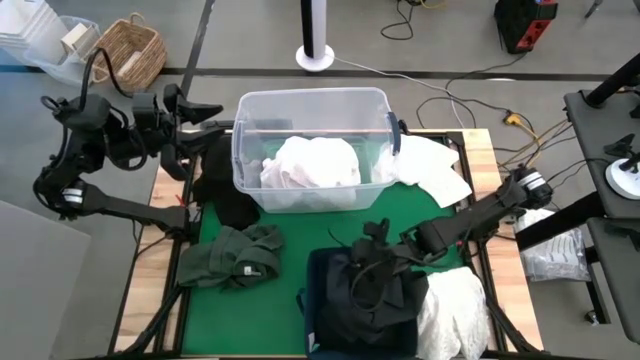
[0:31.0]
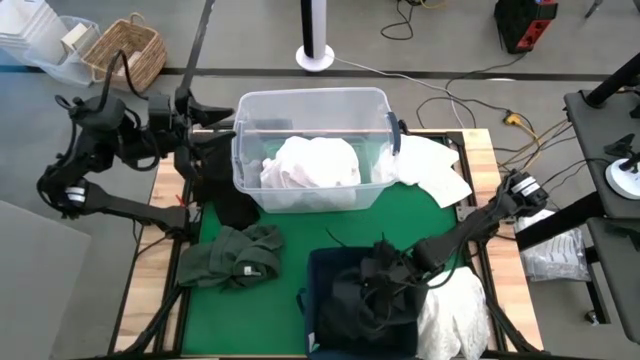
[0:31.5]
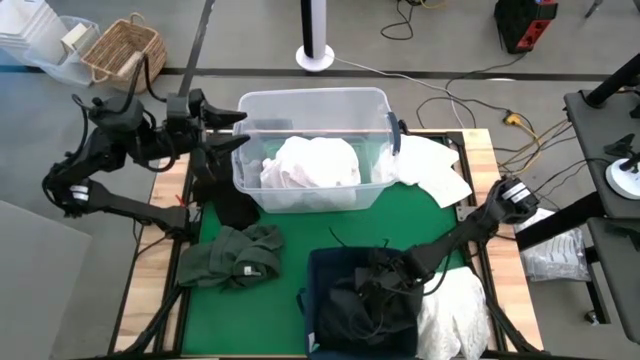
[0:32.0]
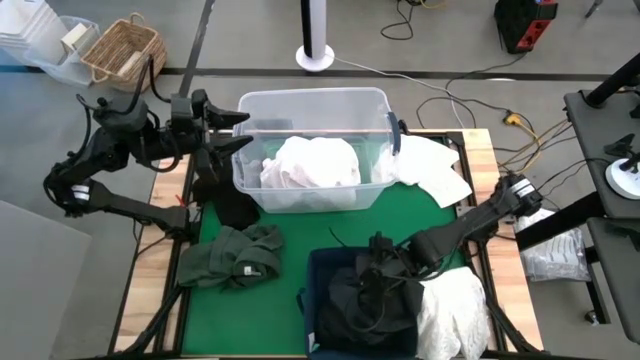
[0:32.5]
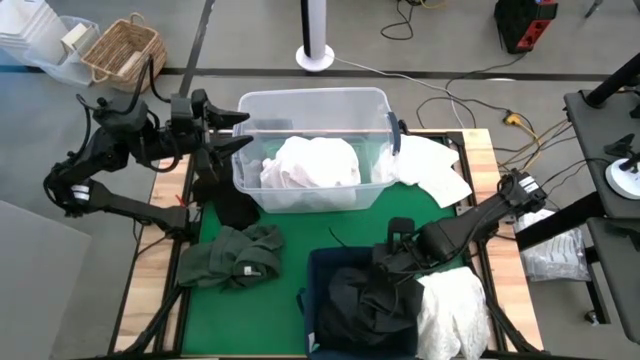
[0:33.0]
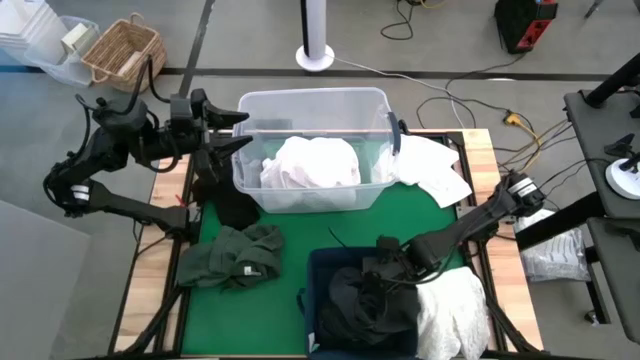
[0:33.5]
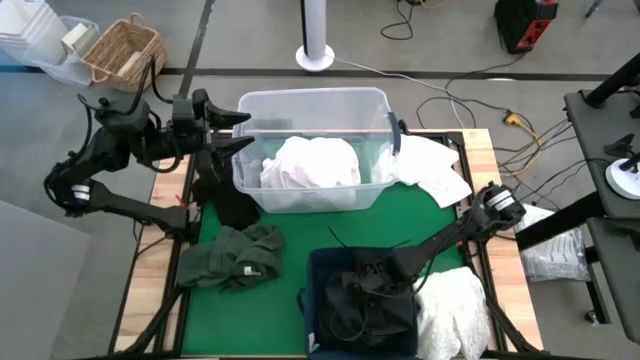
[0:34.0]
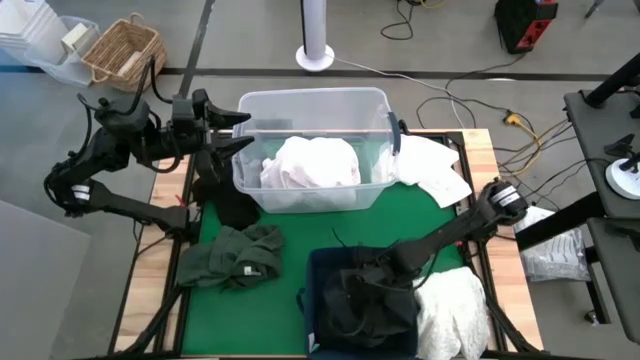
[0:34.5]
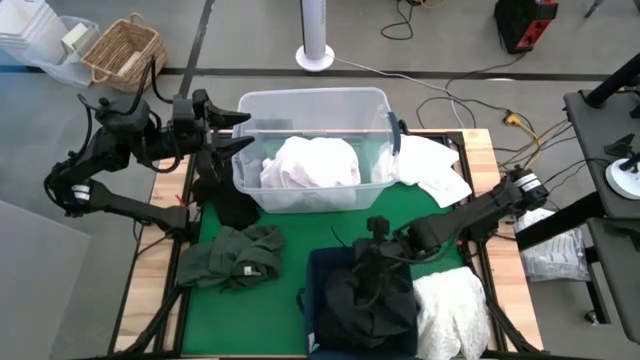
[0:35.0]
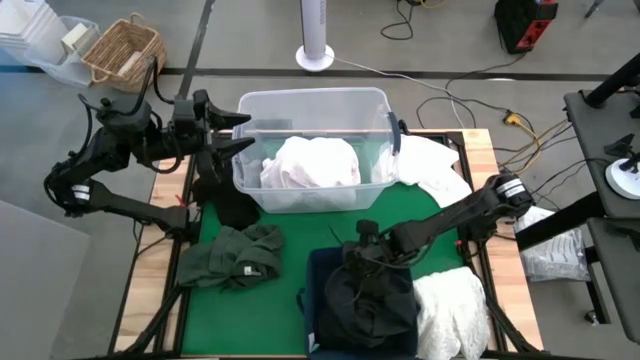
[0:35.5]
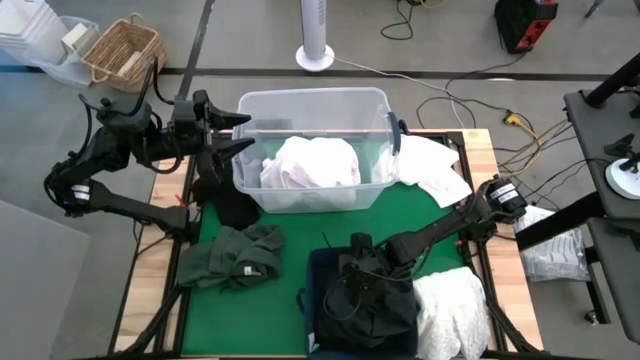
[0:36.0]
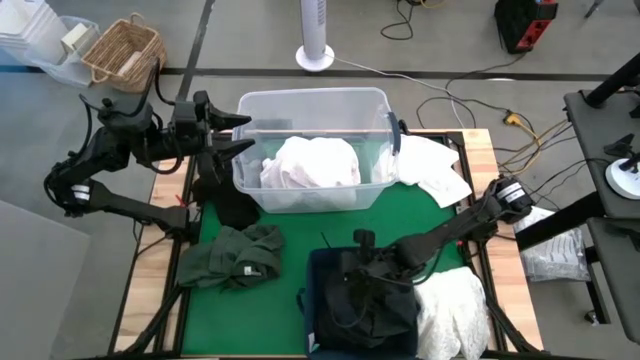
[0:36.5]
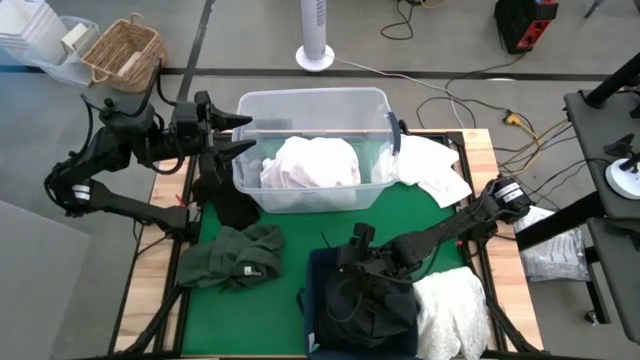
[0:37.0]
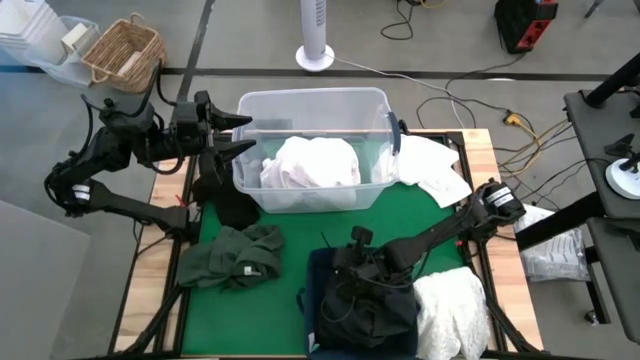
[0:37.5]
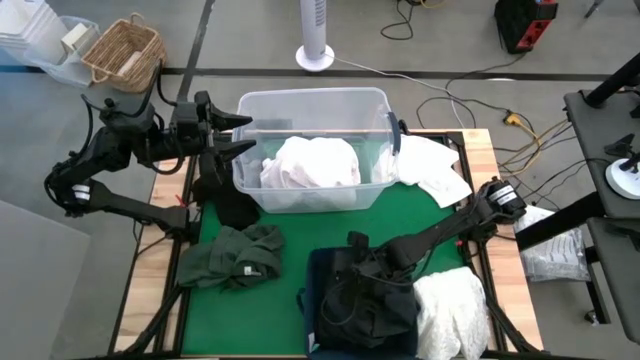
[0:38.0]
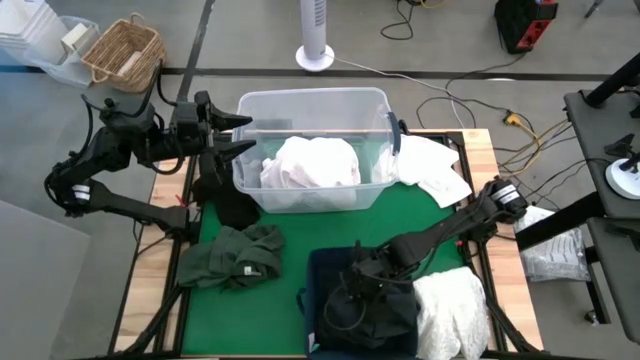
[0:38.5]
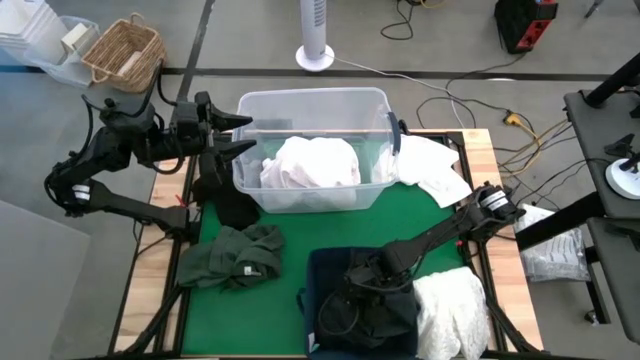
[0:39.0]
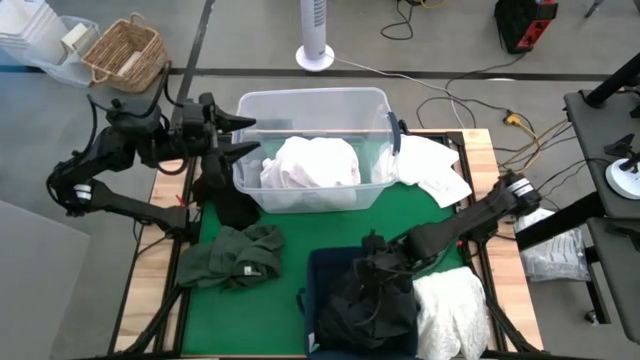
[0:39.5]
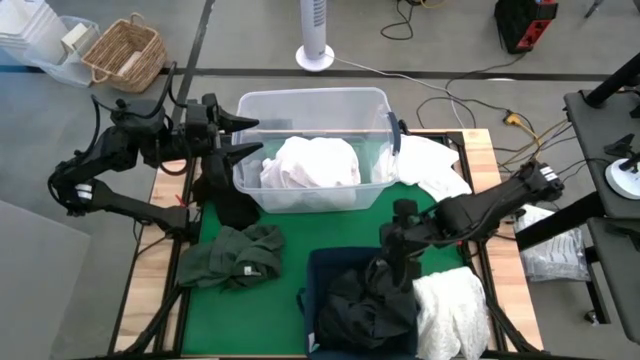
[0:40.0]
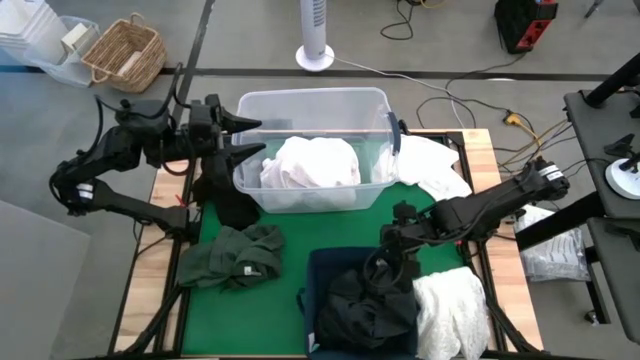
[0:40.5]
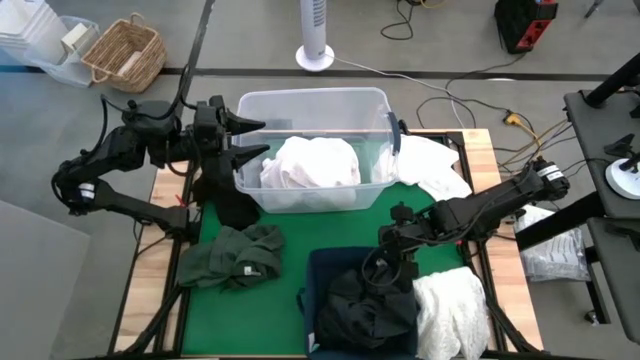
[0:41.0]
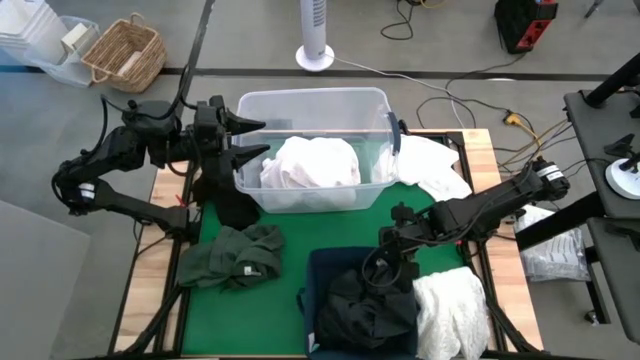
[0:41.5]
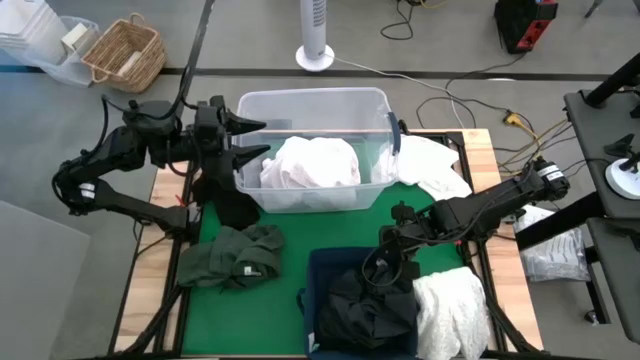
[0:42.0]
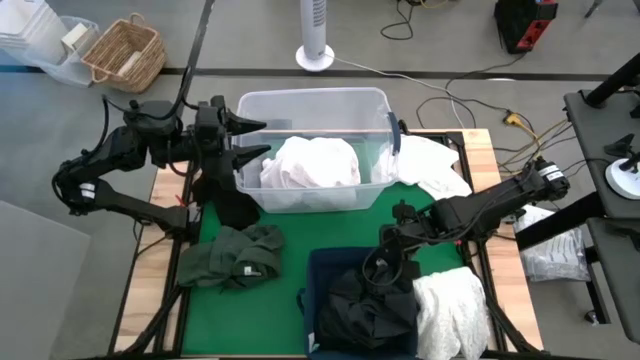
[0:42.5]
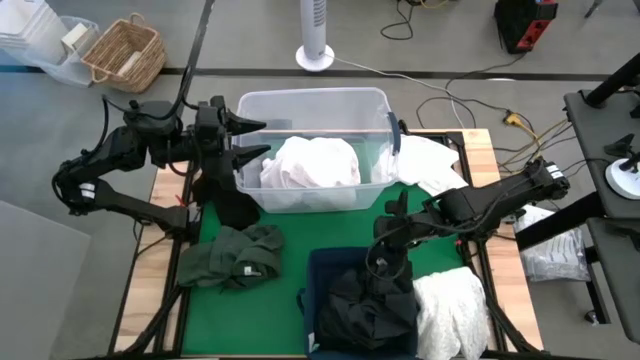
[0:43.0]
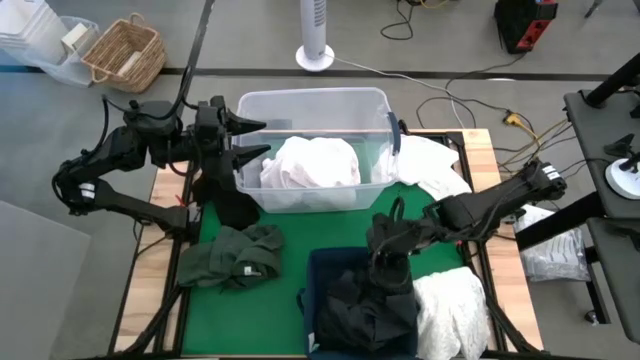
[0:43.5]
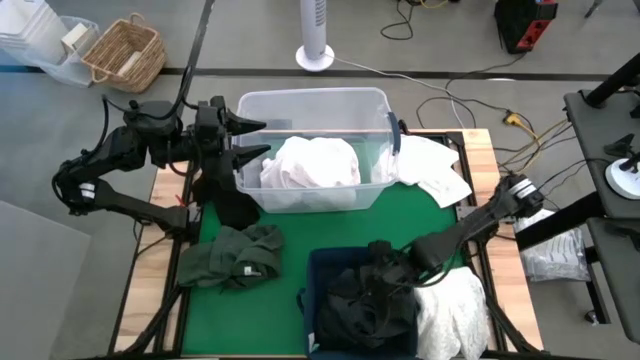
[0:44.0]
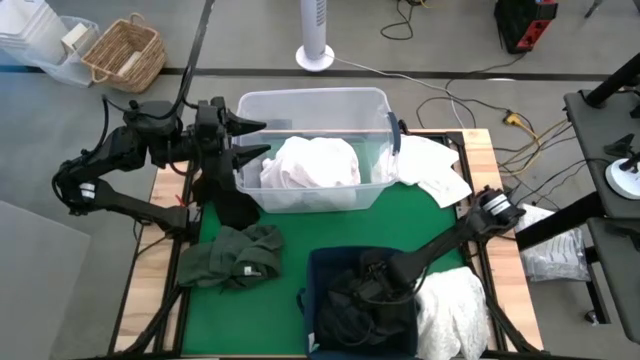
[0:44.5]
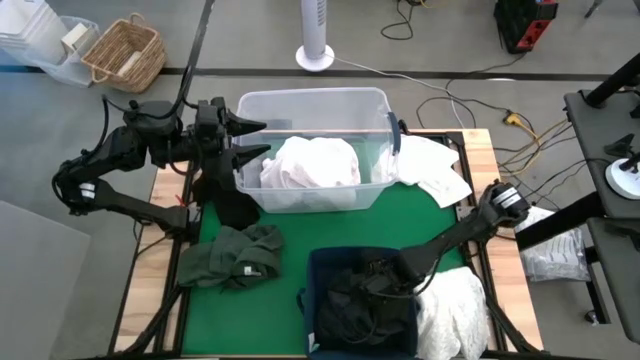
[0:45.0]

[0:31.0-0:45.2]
Put the black shorts into the blue laundry bin

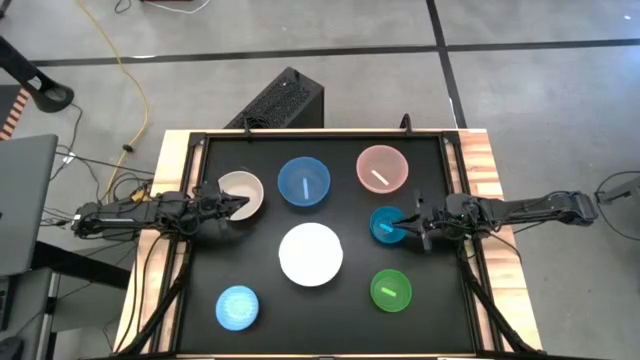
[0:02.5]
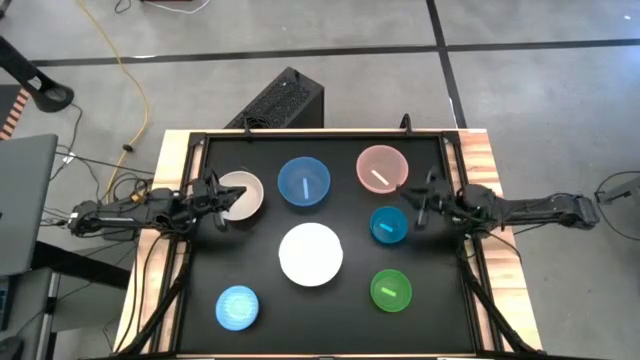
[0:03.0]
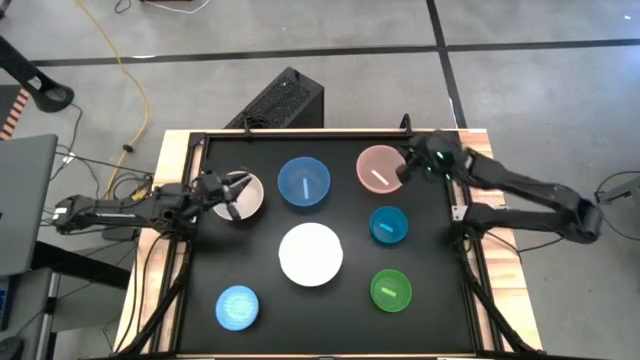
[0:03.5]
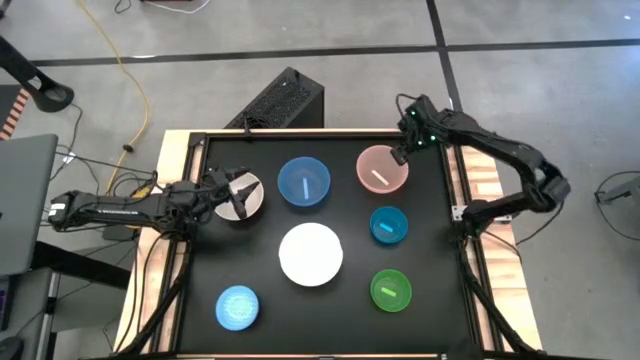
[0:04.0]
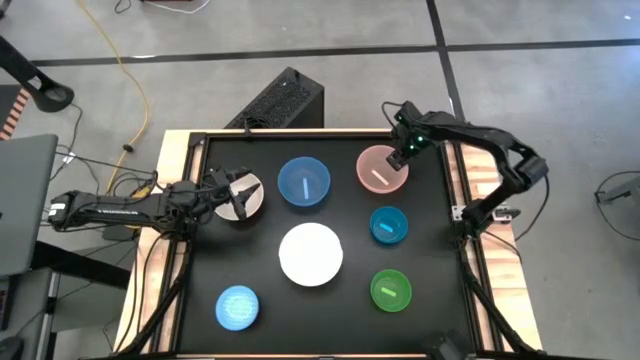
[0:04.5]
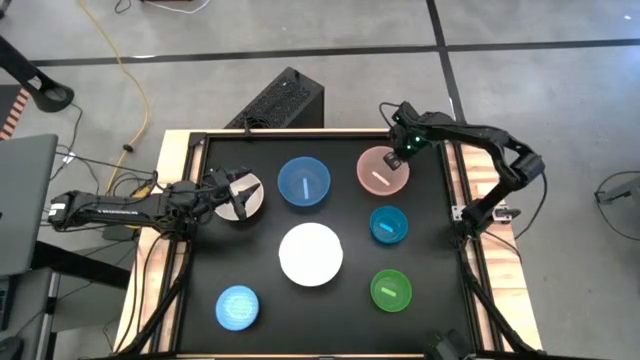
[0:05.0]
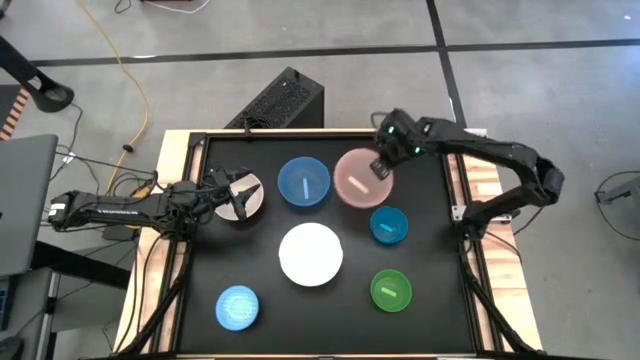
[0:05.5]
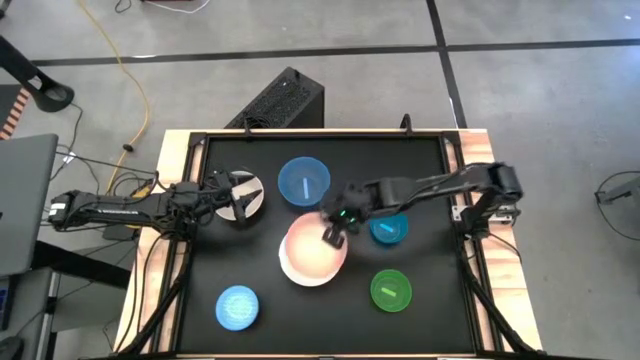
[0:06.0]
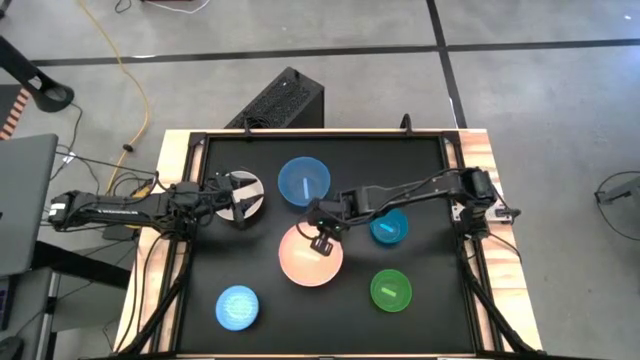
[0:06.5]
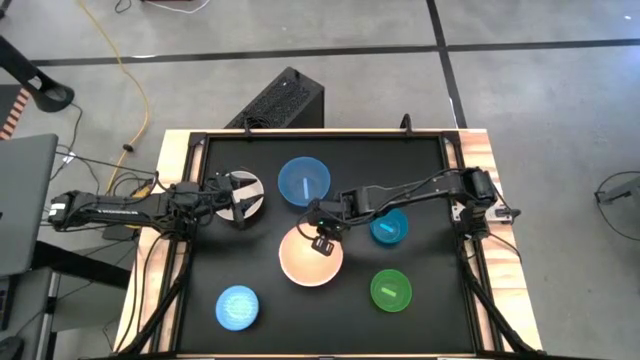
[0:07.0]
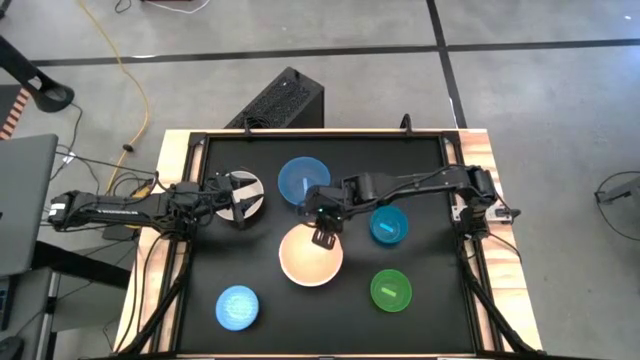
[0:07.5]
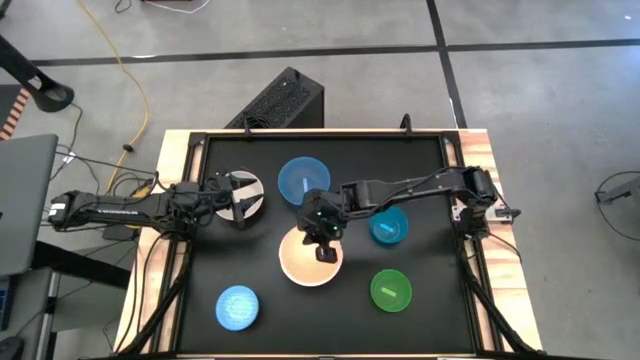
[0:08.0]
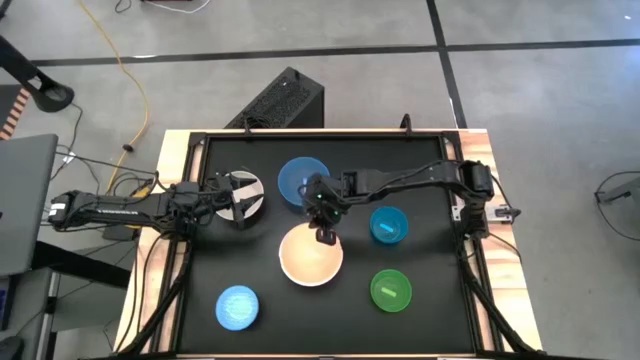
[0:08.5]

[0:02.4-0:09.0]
Stack the transparent light orange bowl on top of the pink bowl
